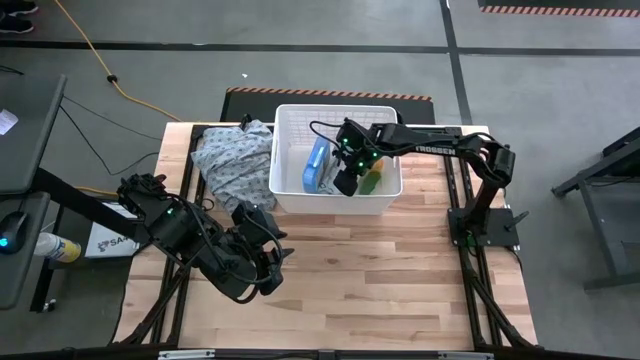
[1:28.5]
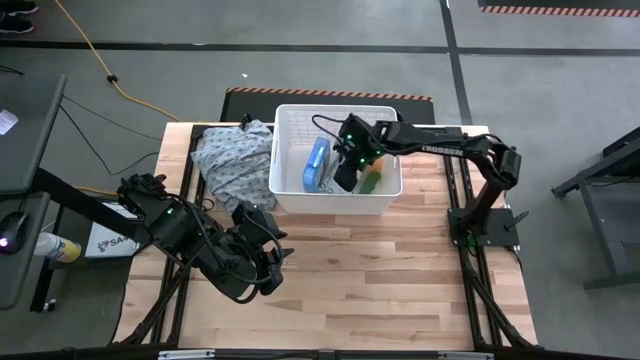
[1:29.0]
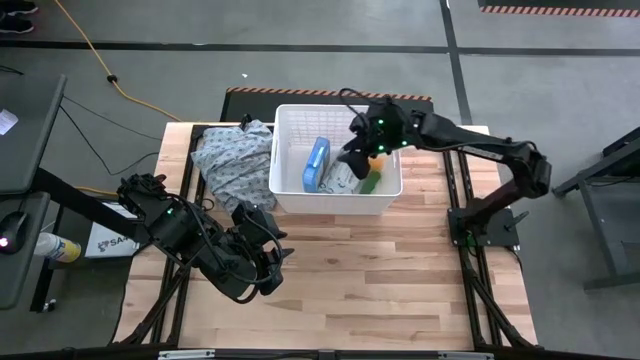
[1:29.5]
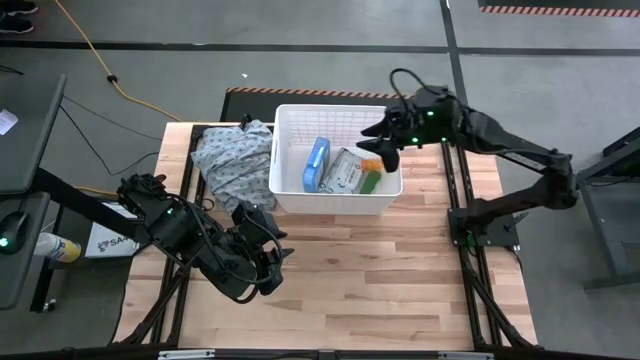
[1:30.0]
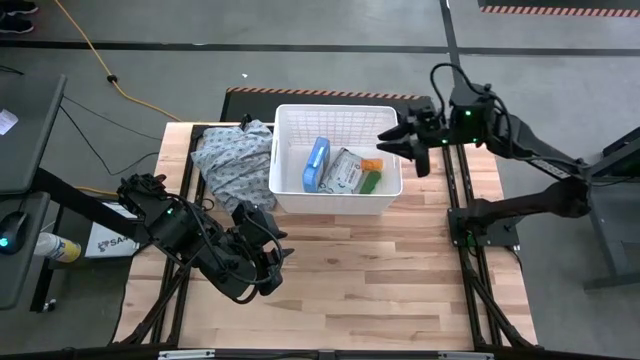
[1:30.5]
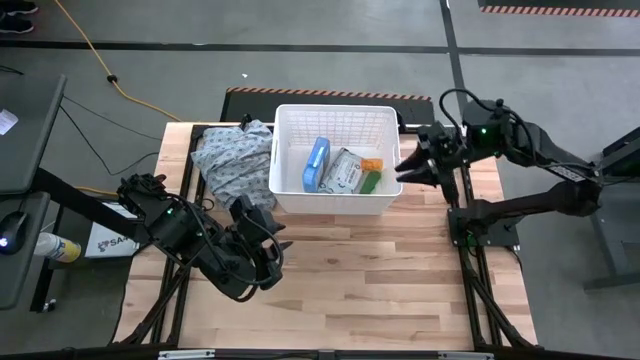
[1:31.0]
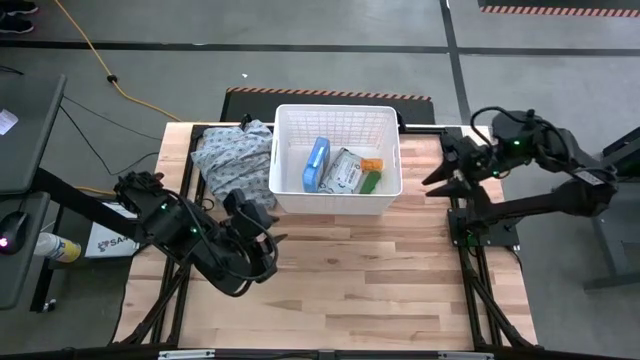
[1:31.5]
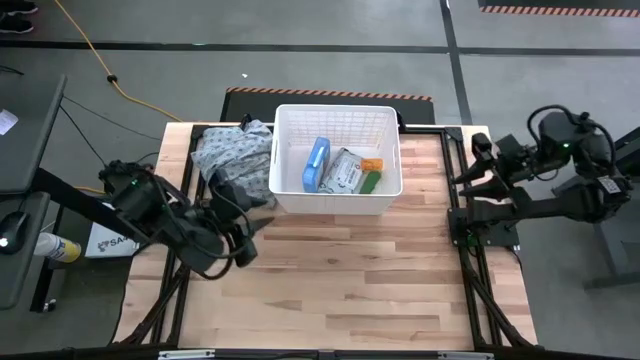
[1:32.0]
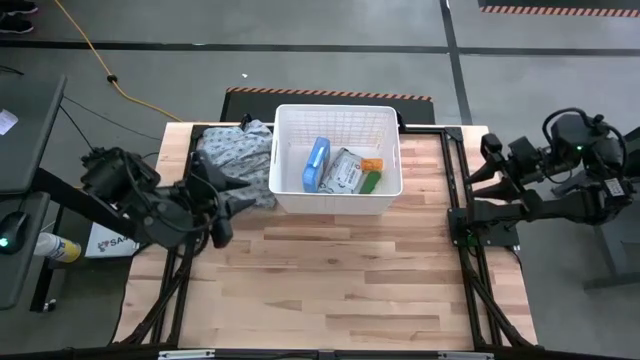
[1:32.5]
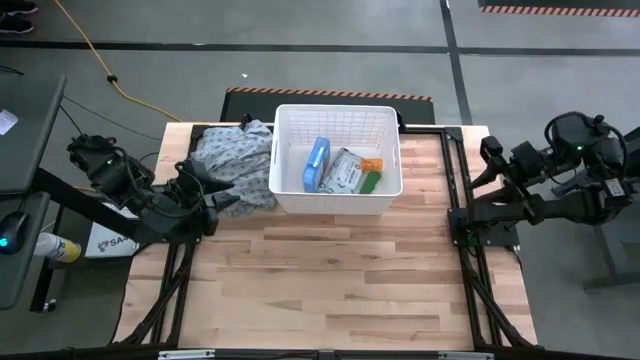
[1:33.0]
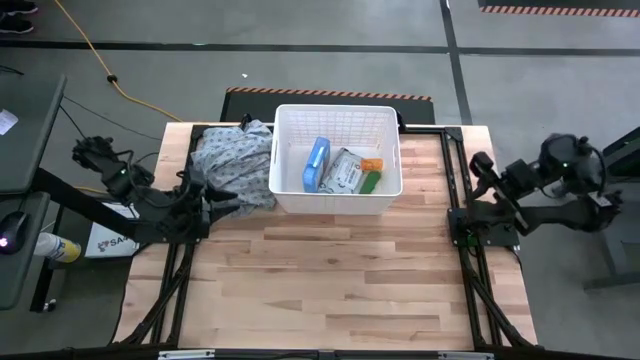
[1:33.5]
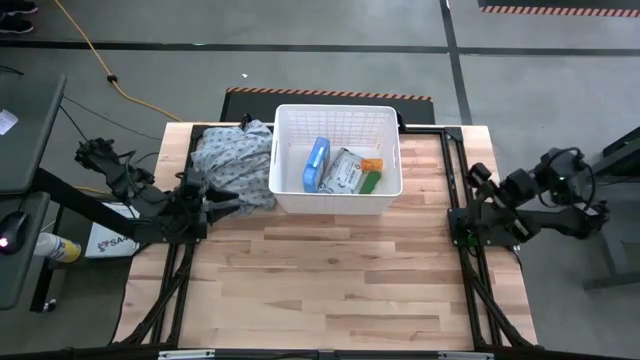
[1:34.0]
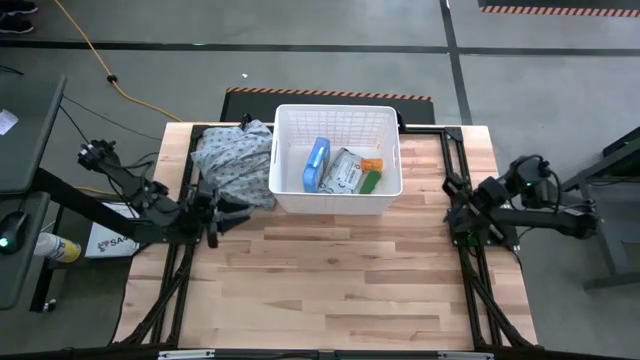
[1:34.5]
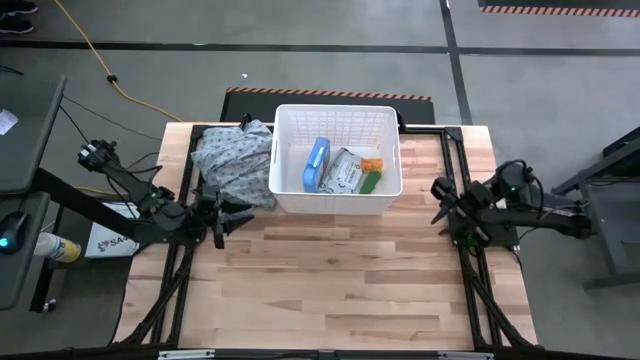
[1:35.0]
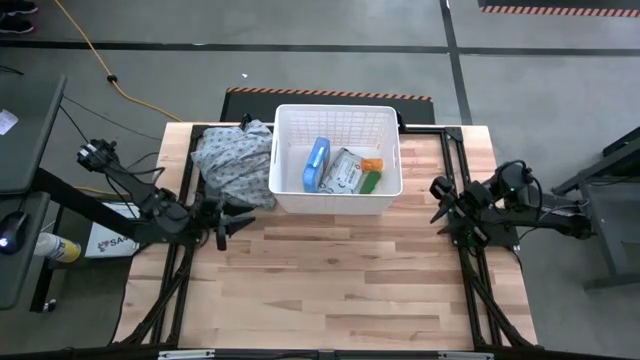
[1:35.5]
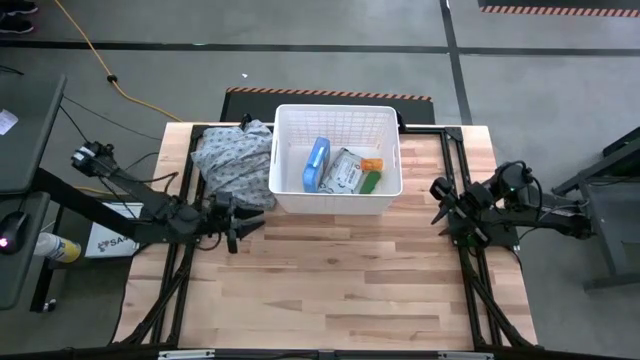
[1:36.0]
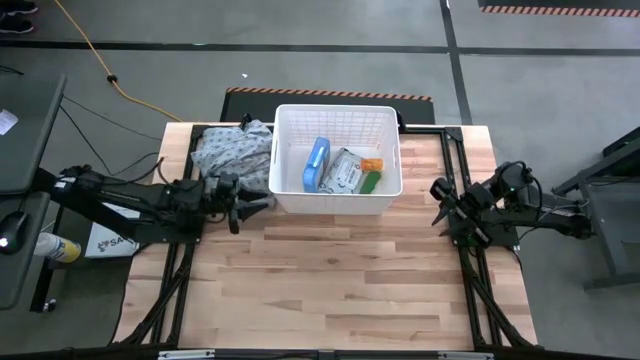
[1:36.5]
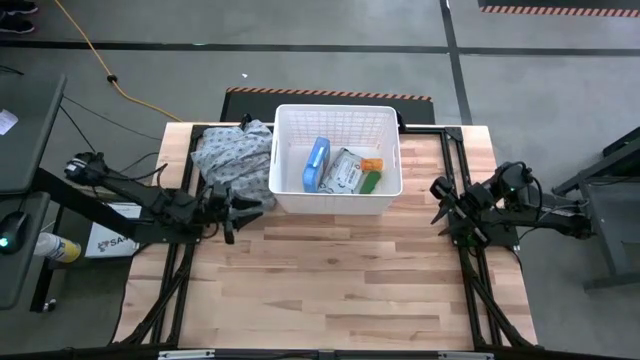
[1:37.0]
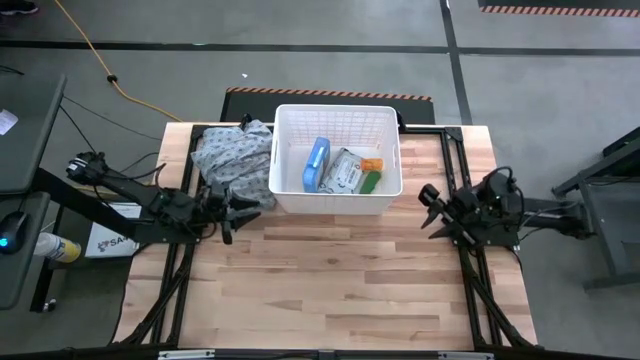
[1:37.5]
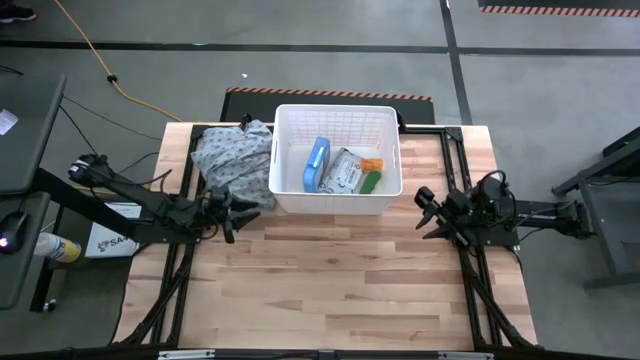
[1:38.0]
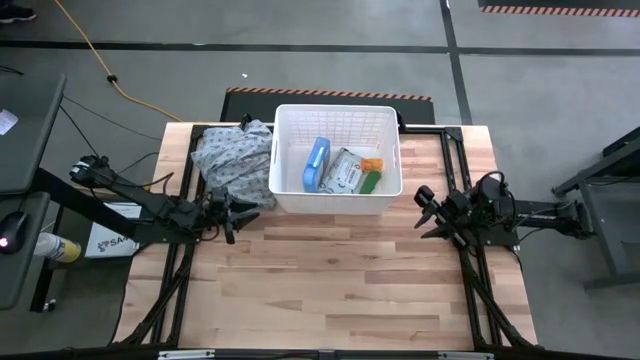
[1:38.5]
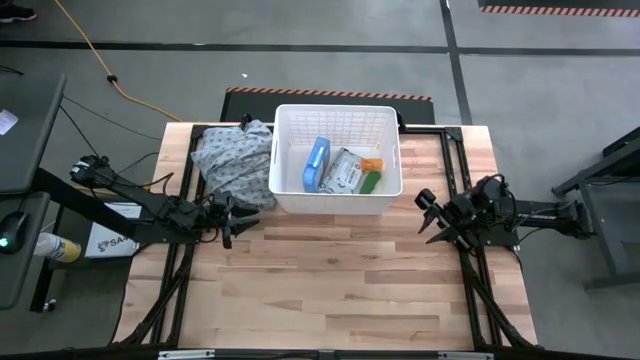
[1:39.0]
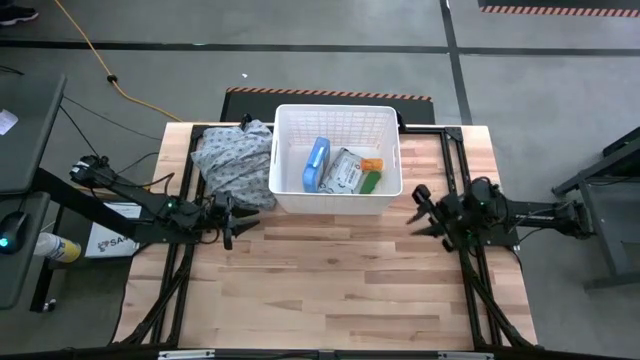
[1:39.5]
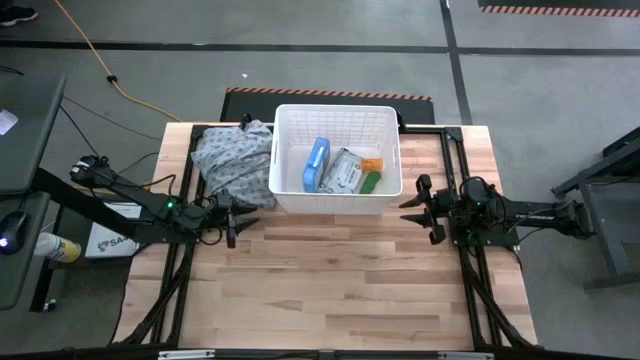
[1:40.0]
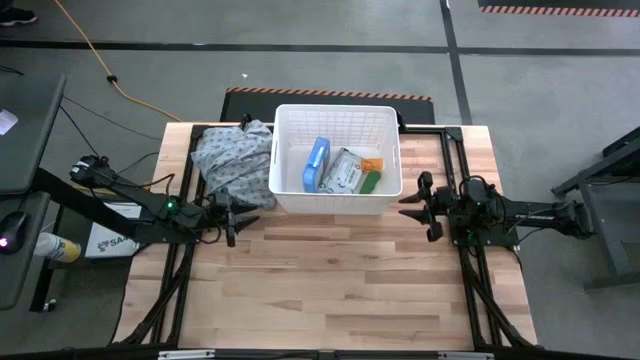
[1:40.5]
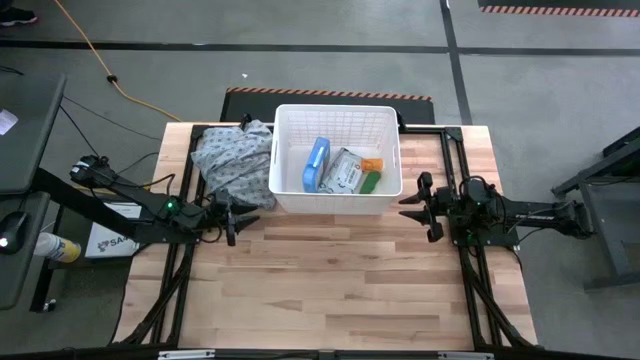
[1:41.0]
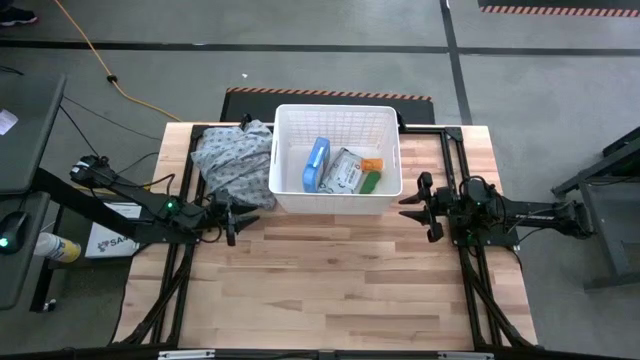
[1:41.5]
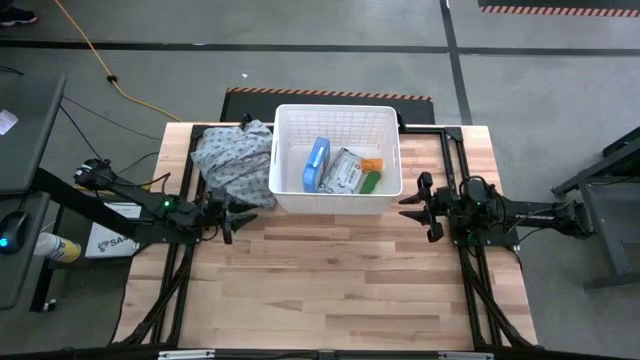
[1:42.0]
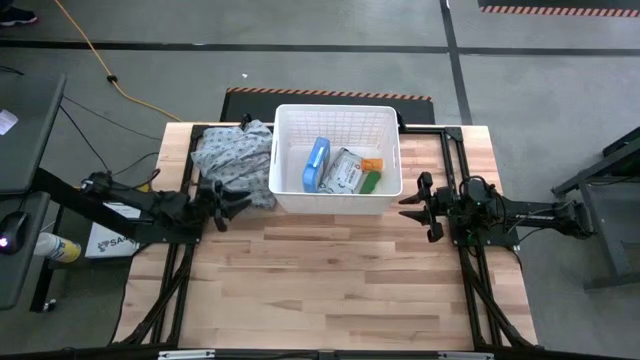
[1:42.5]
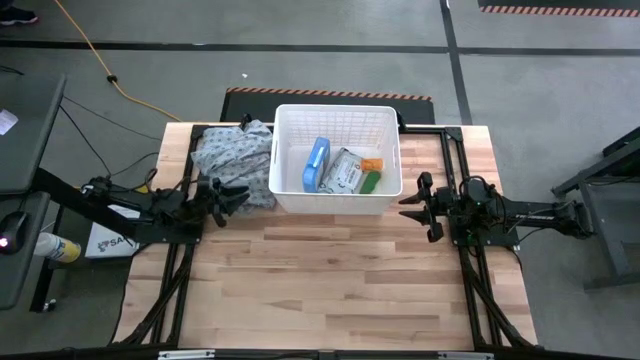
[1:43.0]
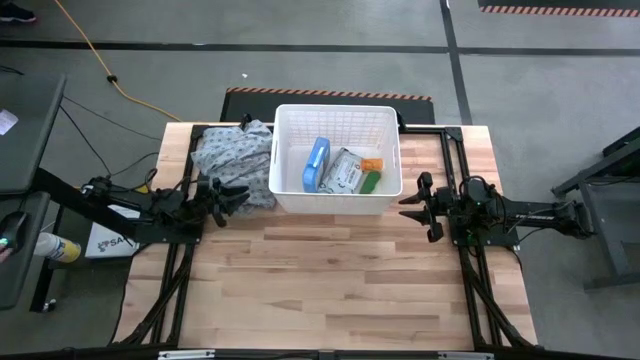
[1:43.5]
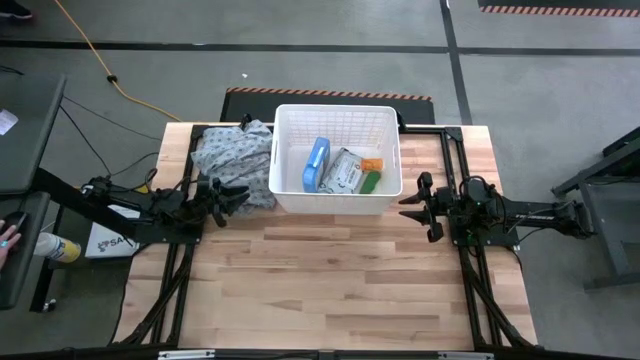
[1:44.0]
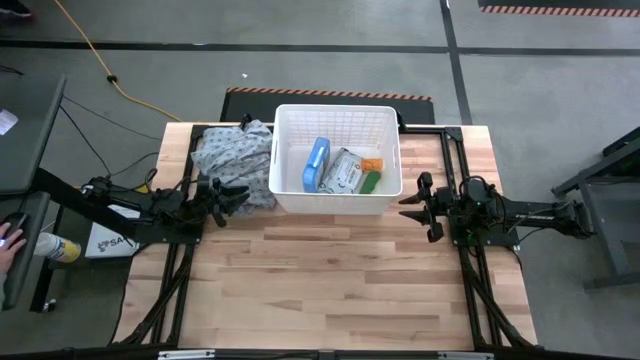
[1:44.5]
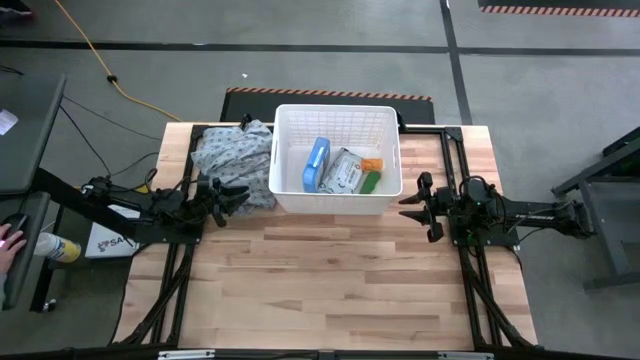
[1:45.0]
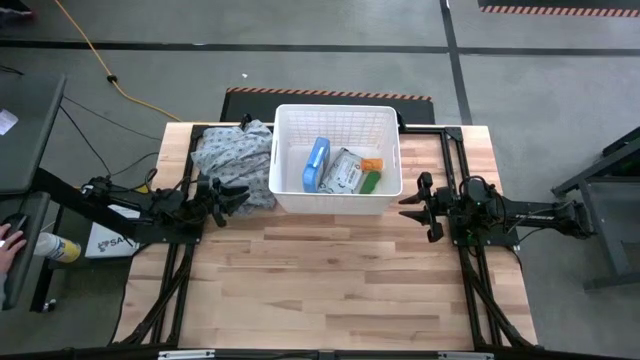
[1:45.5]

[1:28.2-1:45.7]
Task: Pick & place medical supplies in basket/bin
Return to Home Position

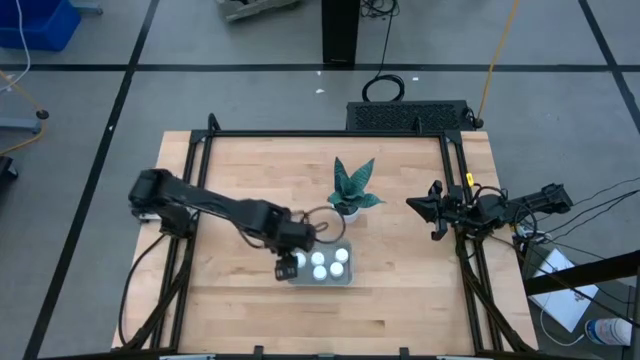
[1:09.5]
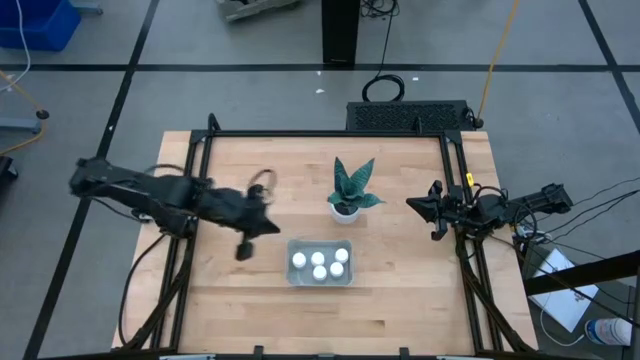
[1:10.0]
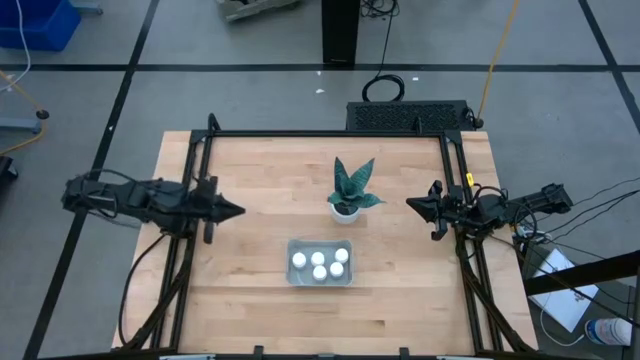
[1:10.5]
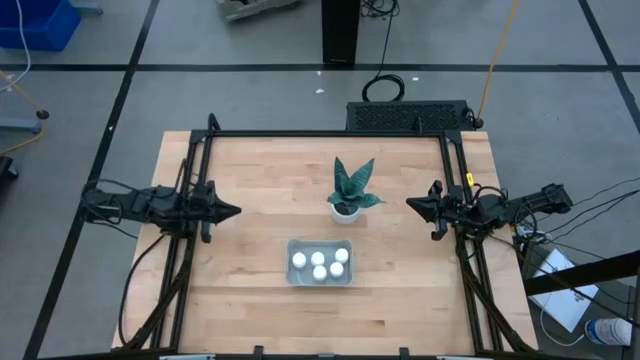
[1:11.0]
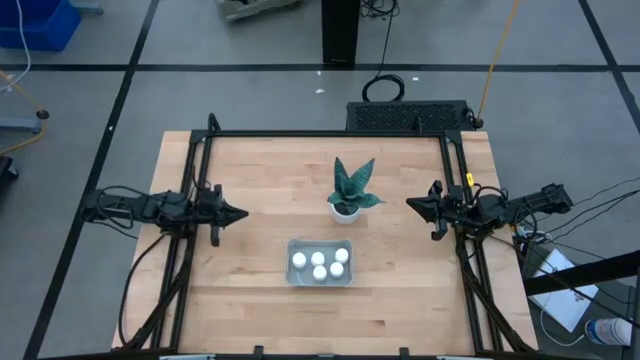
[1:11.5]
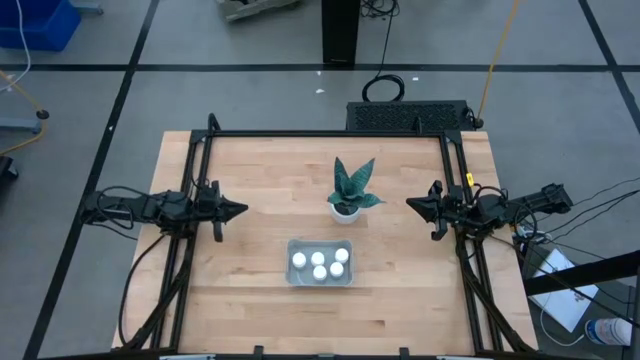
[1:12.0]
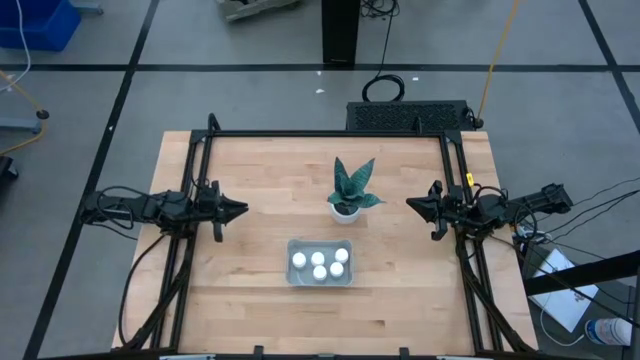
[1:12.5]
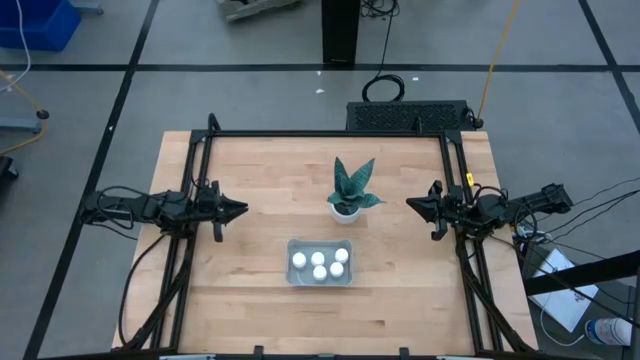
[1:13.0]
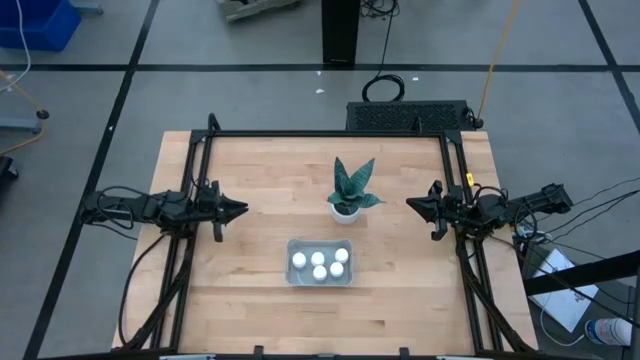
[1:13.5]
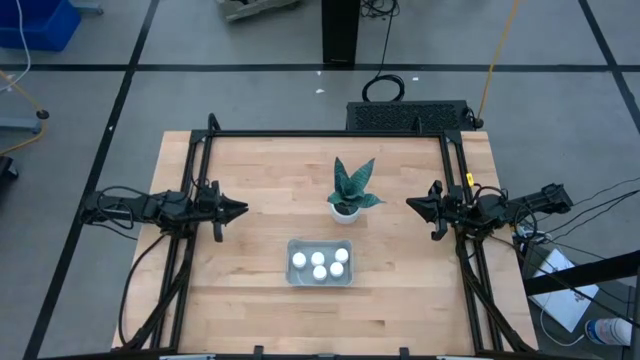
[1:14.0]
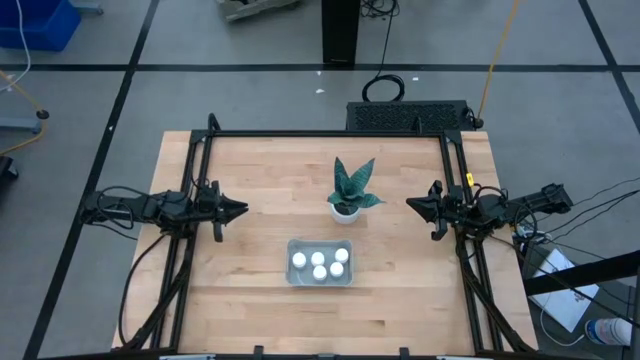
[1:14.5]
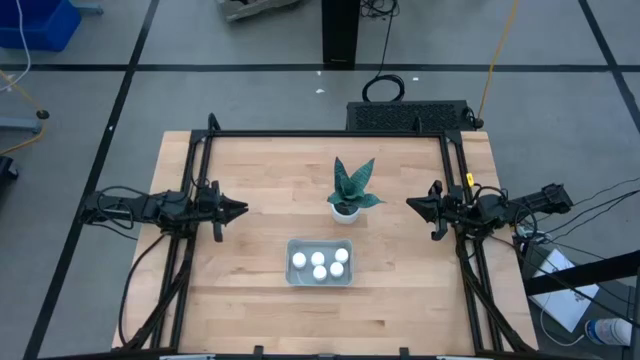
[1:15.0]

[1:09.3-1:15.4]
Task: Pick and place pill bottles into a basket
Return to Home Position
